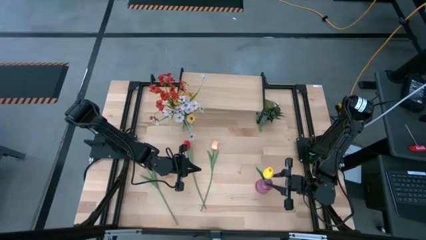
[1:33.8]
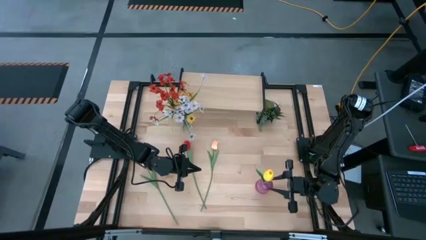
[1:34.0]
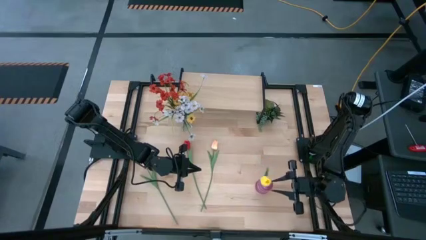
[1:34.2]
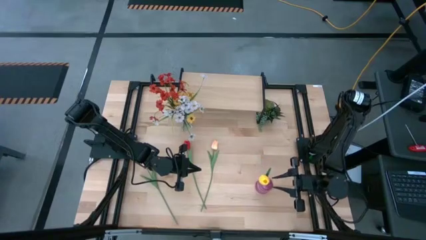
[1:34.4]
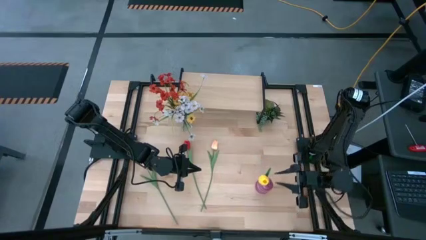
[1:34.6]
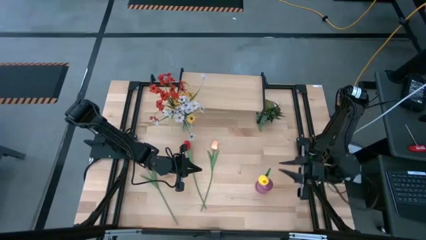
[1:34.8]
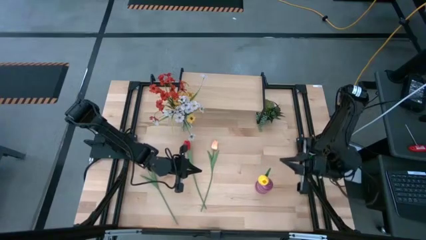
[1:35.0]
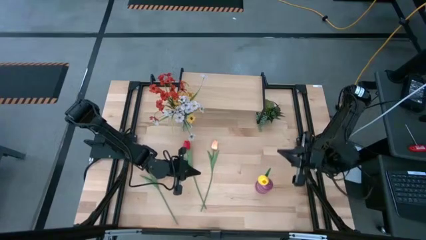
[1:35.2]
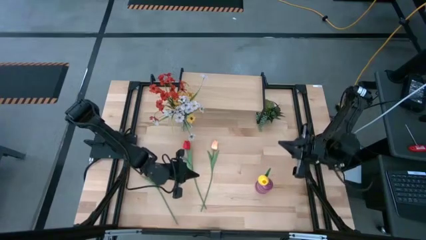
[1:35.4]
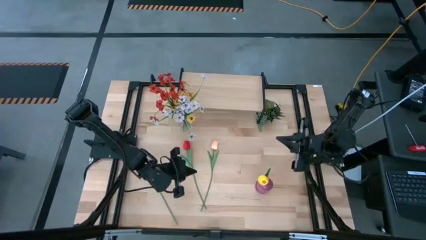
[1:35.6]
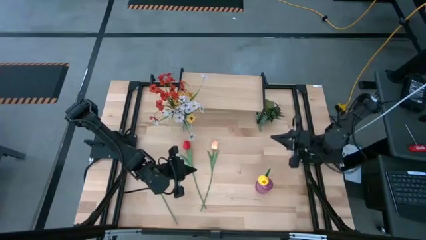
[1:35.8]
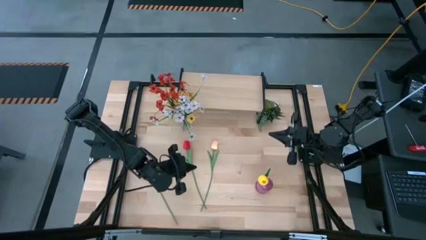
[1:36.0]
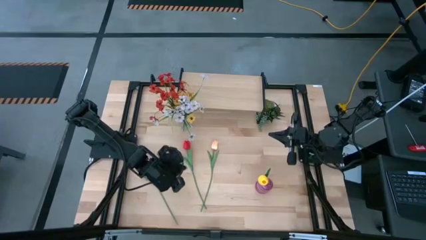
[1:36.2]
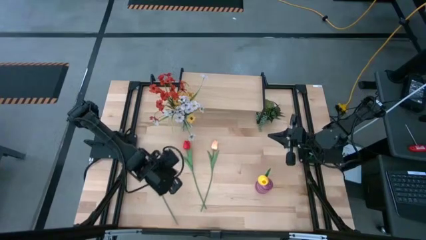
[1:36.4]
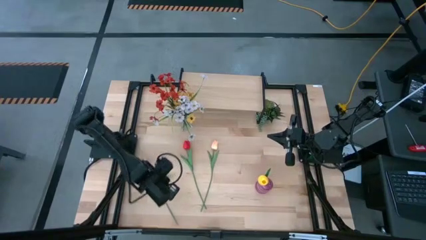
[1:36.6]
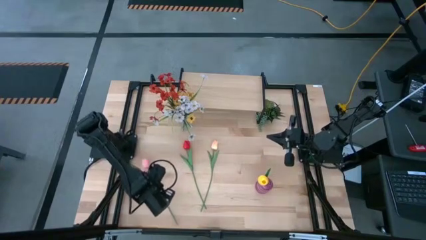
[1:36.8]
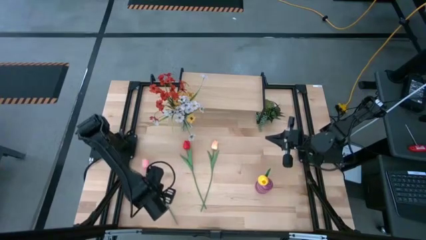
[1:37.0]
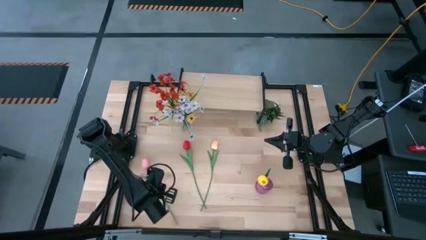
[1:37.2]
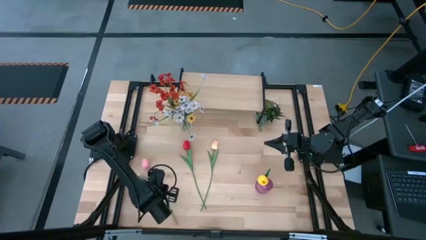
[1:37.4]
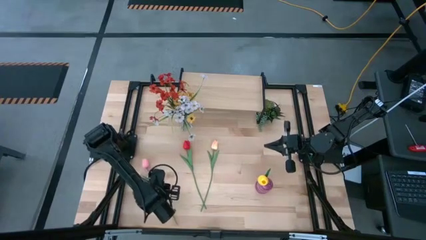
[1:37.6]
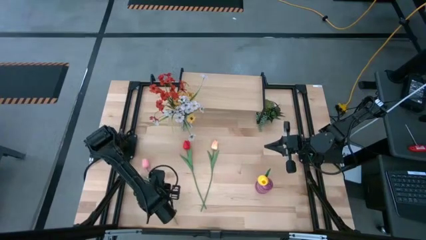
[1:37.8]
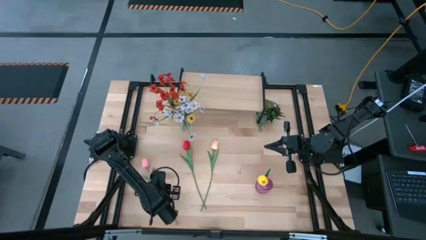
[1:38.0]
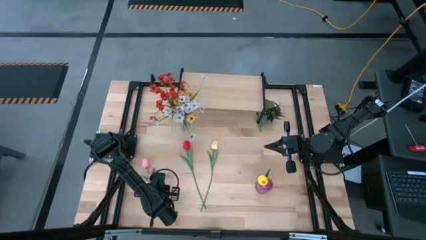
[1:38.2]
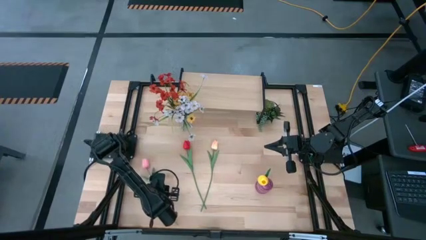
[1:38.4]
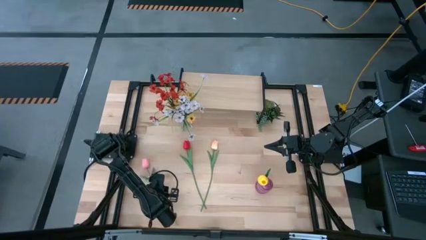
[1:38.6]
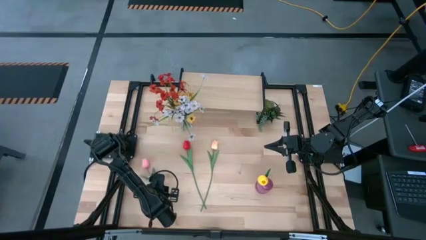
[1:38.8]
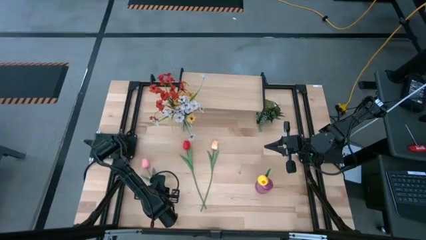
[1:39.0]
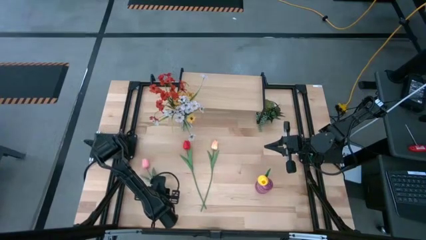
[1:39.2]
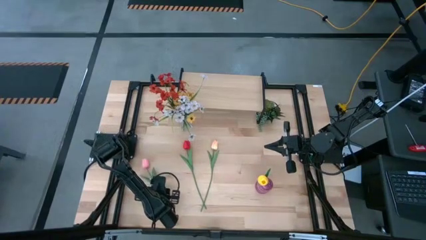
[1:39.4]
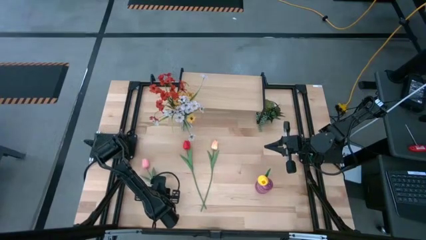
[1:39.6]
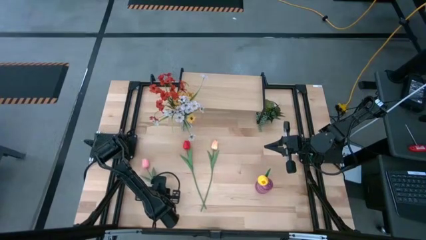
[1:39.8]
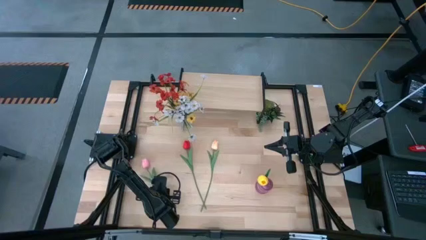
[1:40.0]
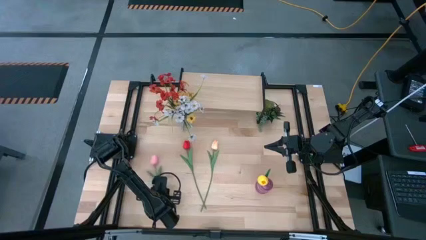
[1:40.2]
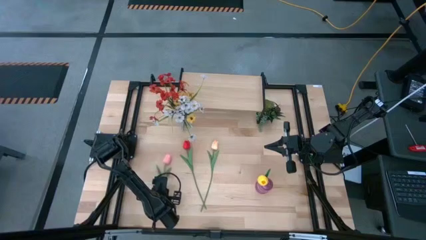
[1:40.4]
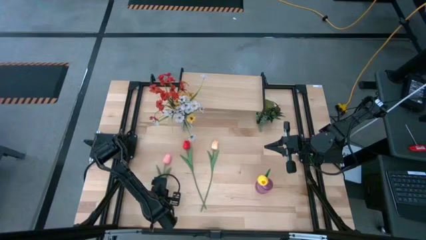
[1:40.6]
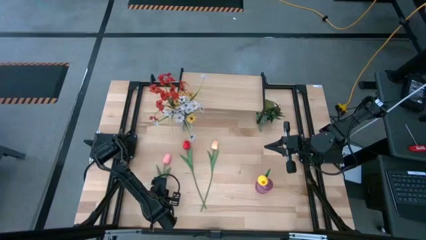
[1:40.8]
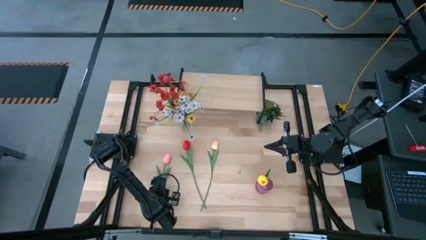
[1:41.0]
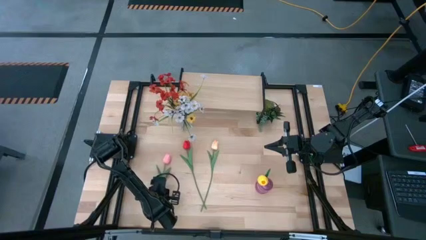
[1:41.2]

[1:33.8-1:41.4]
Task: Pick and place flowers into a vace then onto a shelf
Put the pink flower into the purple vase

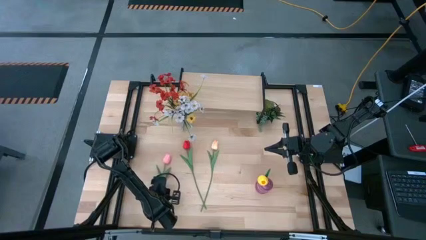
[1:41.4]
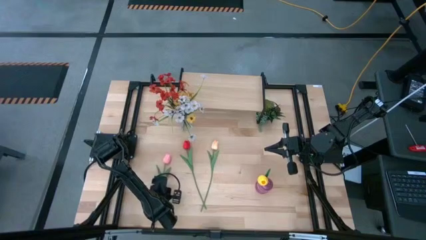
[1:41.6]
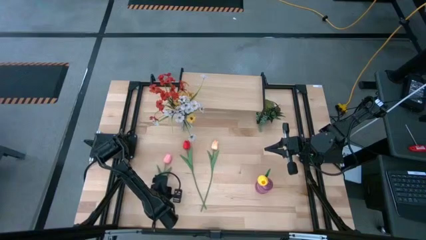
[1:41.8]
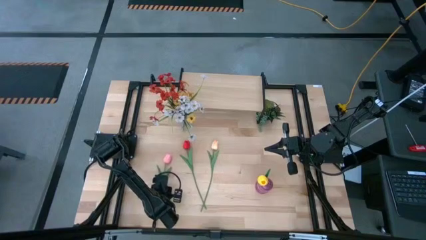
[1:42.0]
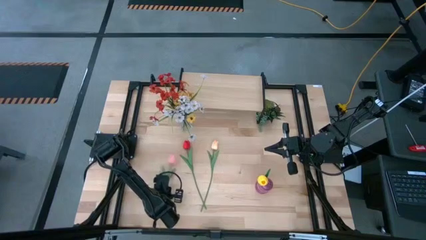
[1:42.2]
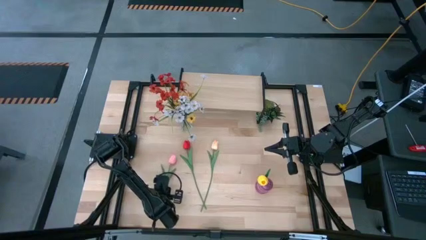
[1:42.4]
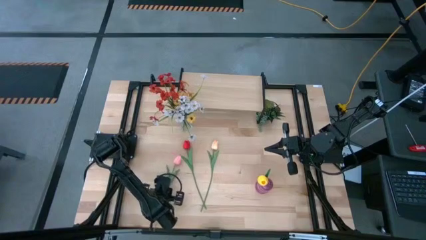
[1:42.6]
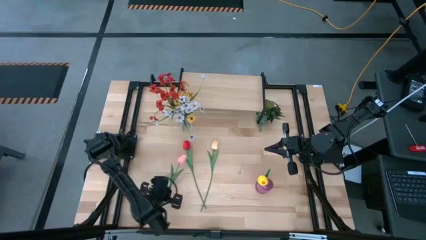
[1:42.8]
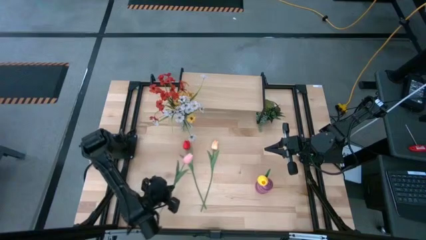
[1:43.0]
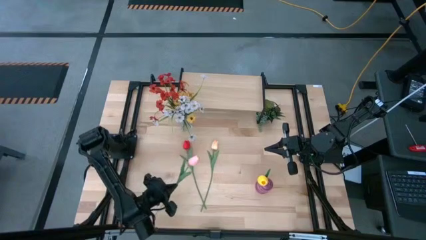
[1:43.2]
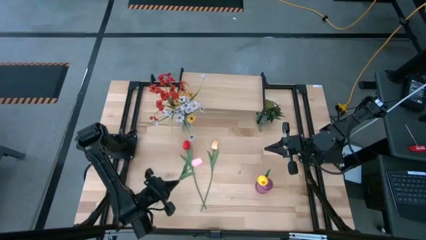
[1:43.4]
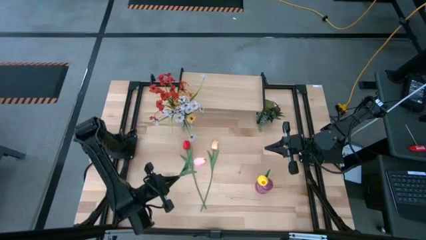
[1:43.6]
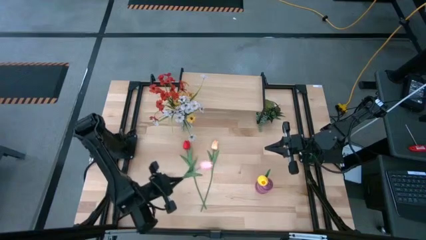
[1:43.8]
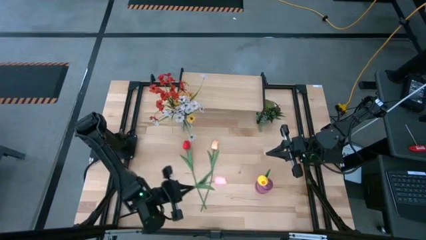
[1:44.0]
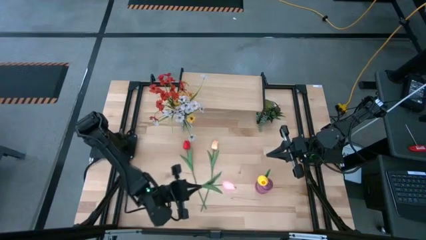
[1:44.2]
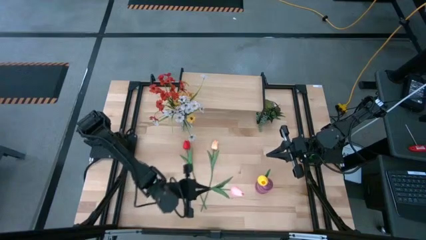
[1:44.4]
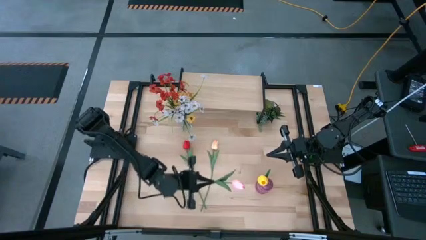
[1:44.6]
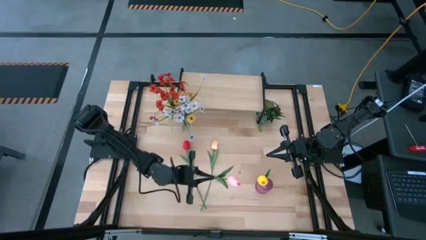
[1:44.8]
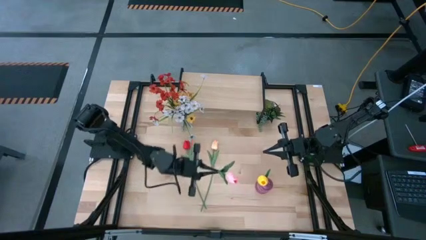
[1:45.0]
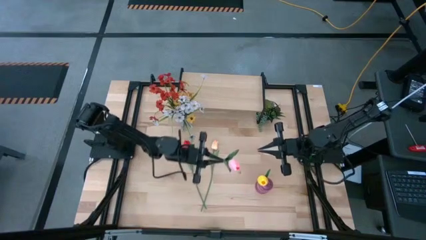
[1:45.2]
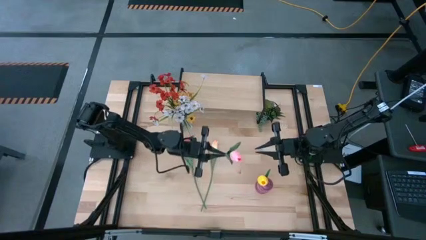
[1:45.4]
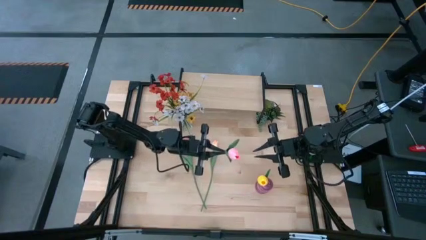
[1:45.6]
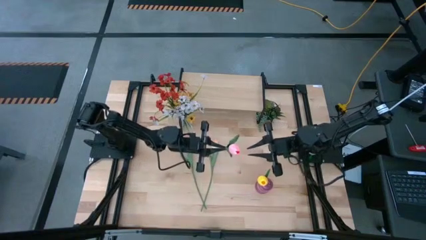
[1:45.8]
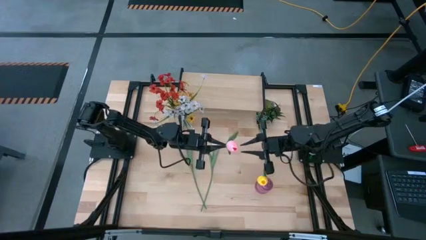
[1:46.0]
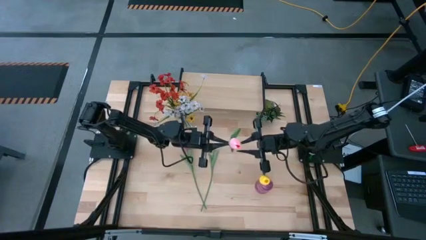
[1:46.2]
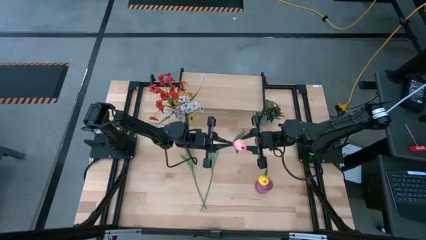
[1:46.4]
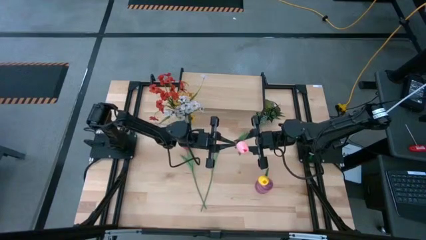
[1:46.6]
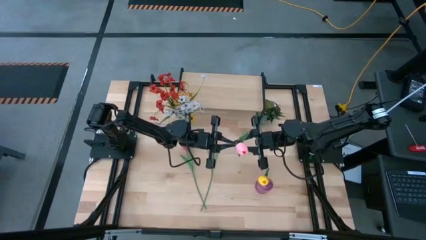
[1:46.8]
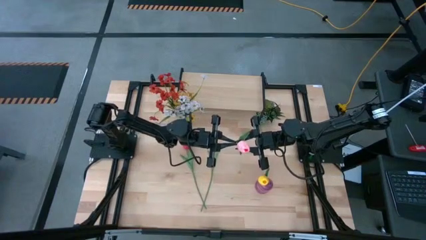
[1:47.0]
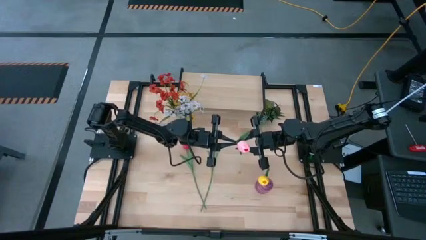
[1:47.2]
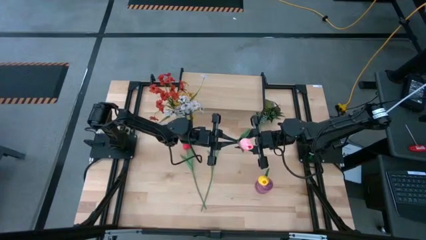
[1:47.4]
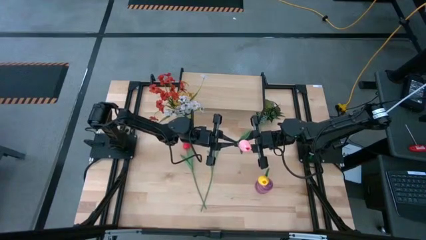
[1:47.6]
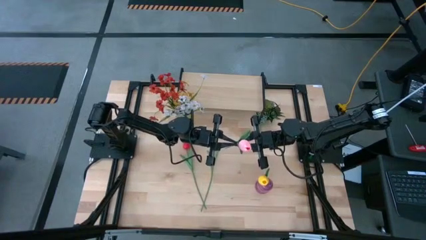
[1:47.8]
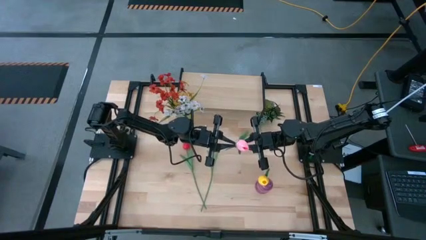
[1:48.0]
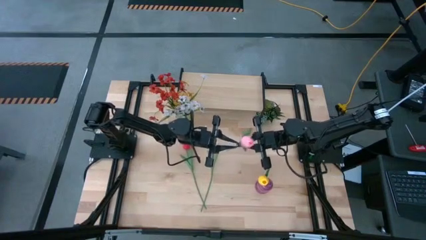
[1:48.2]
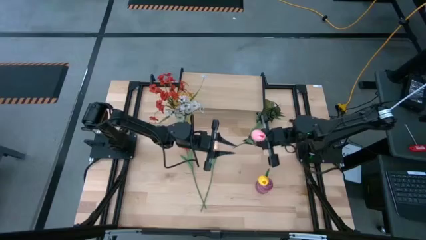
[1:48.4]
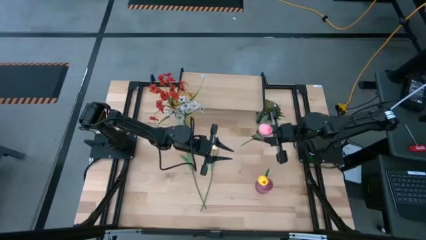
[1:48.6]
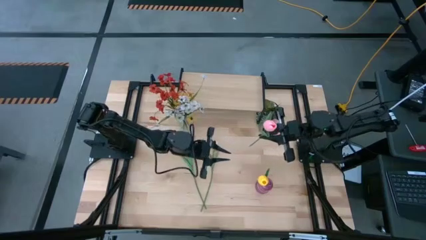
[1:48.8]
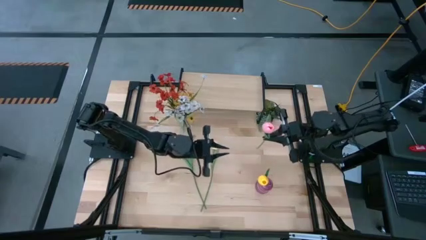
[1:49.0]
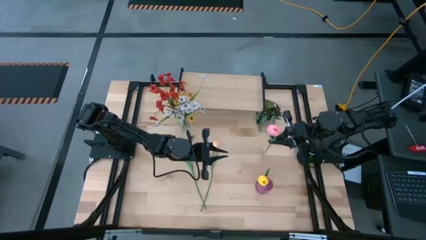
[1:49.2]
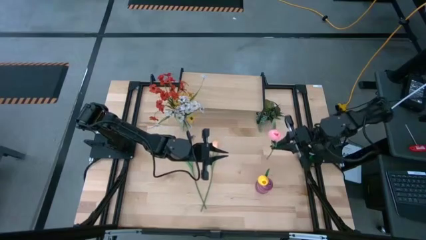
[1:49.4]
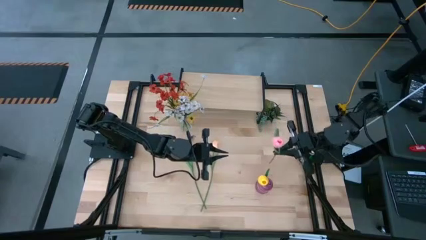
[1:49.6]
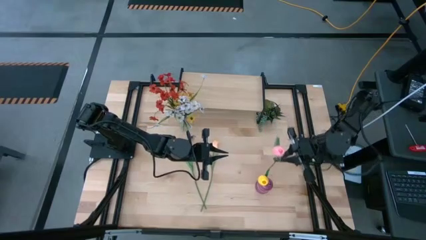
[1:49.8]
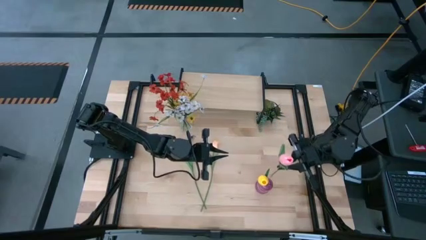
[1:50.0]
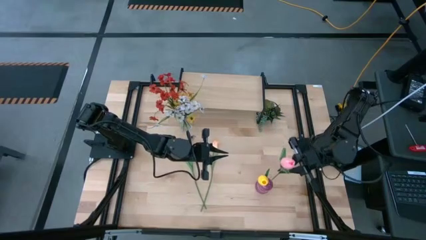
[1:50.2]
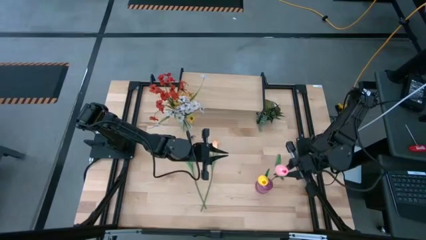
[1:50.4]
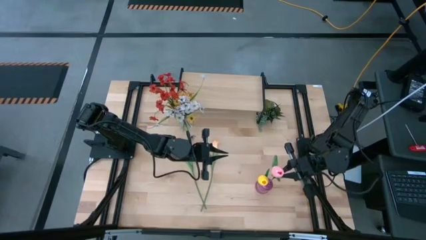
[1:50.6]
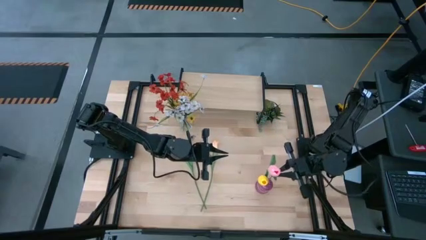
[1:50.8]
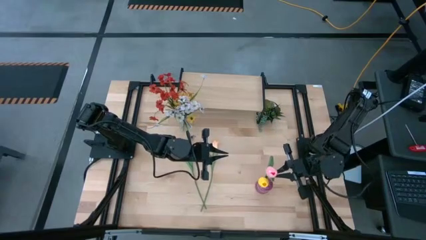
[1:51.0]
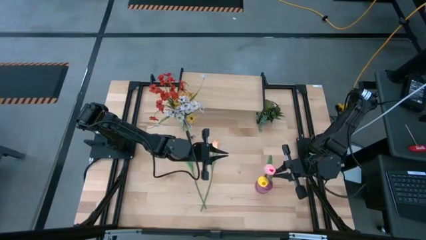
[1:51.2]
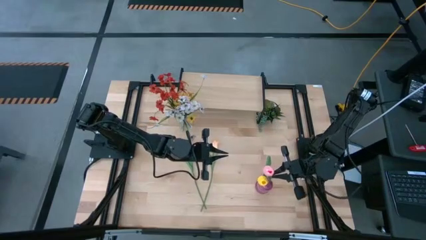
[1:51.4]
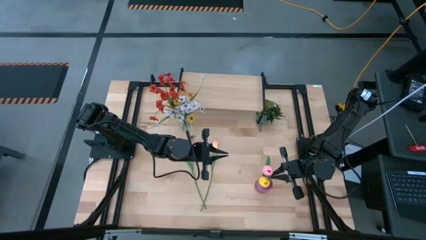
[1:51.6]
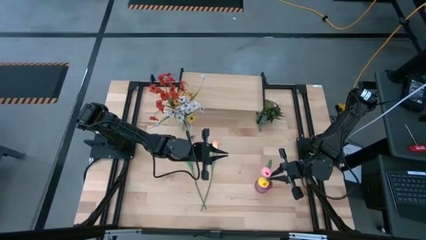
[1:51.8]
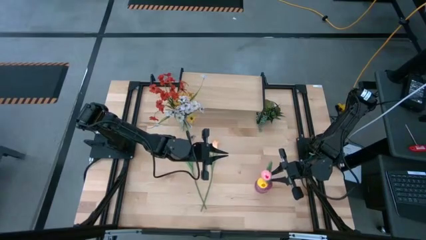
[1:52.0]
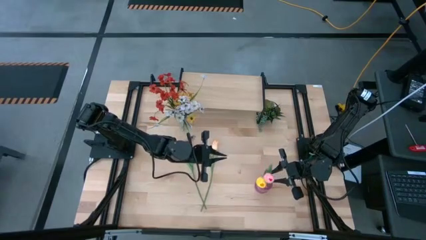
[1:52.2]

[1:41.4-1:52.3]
Put the pink flower into the purple vase
